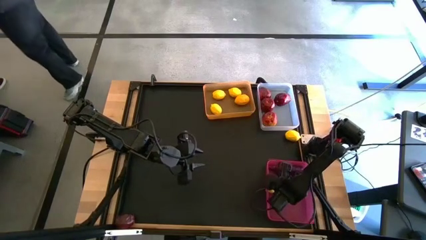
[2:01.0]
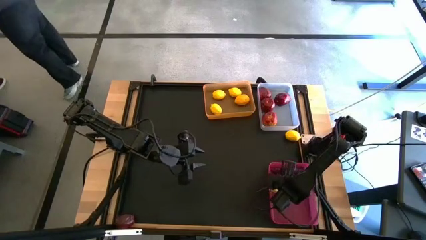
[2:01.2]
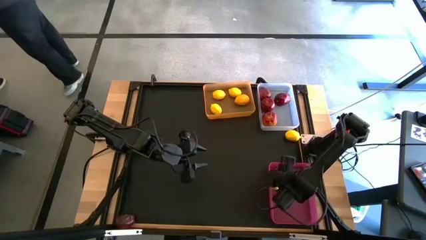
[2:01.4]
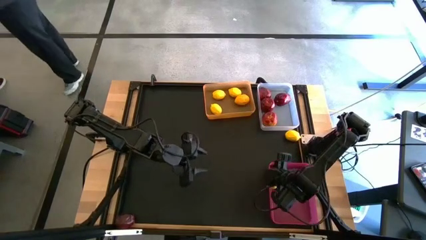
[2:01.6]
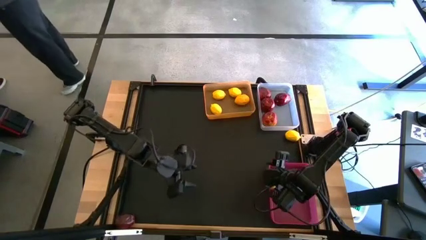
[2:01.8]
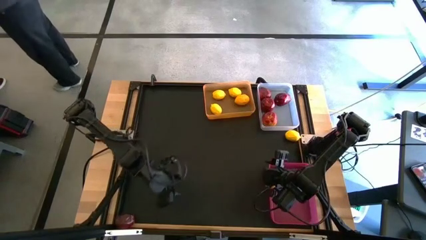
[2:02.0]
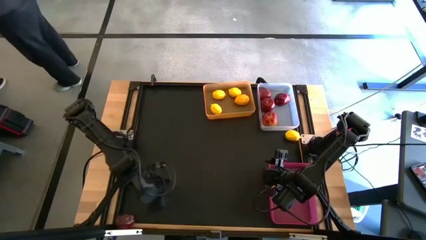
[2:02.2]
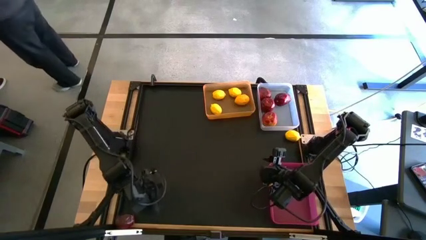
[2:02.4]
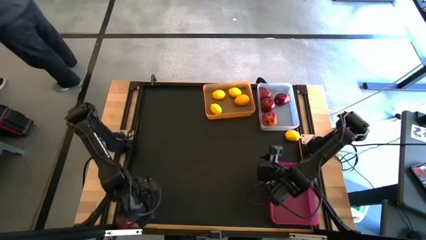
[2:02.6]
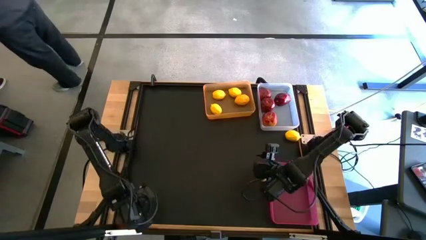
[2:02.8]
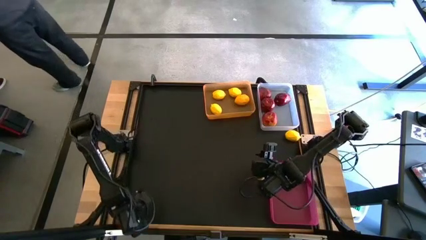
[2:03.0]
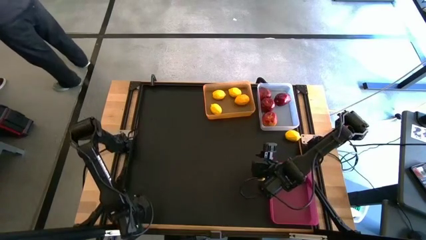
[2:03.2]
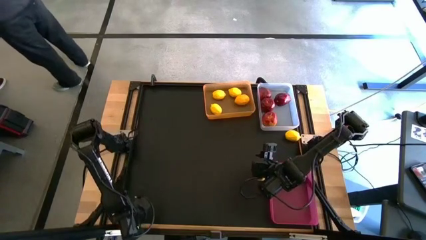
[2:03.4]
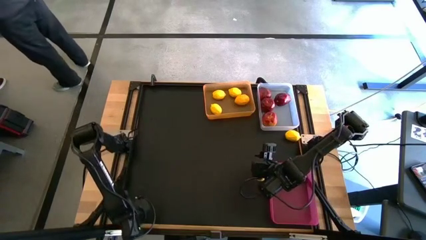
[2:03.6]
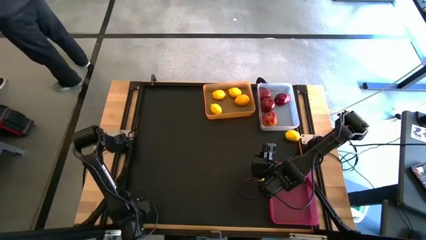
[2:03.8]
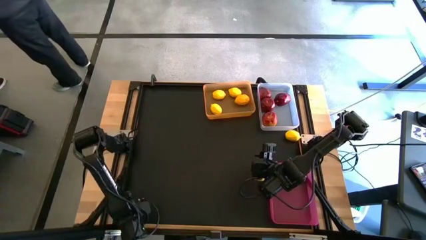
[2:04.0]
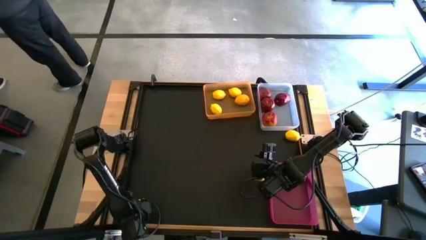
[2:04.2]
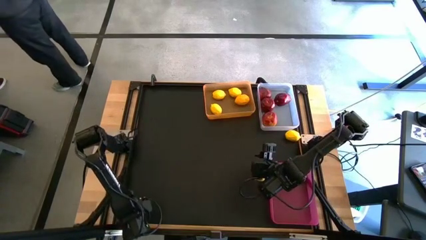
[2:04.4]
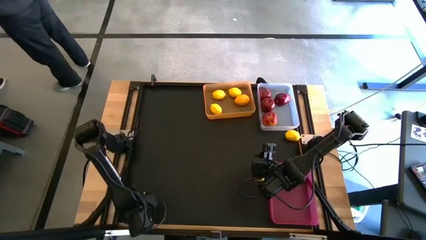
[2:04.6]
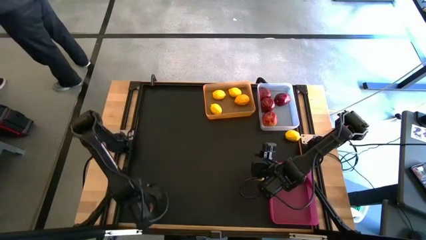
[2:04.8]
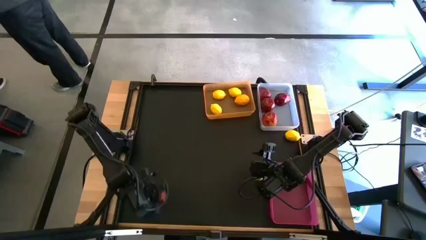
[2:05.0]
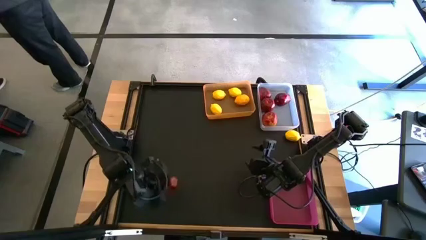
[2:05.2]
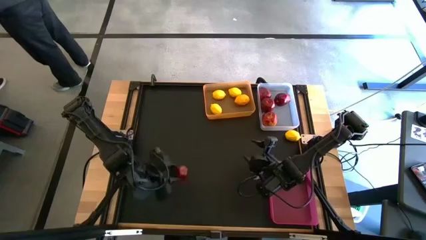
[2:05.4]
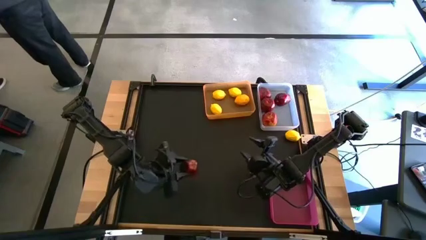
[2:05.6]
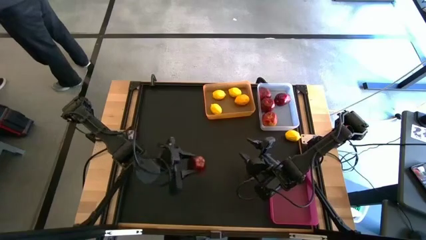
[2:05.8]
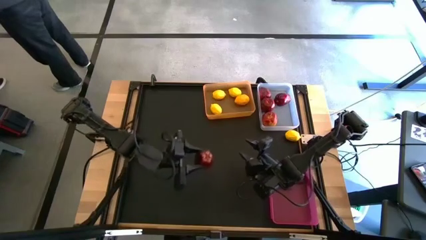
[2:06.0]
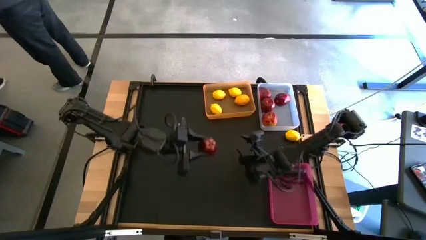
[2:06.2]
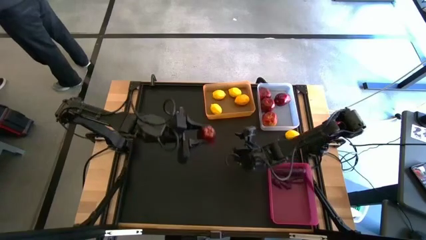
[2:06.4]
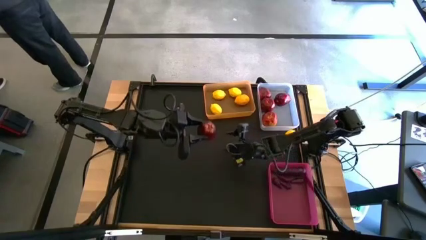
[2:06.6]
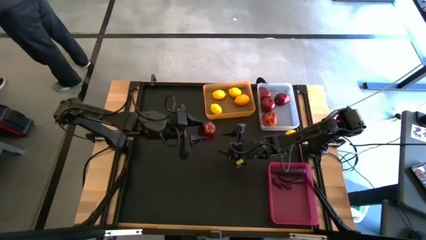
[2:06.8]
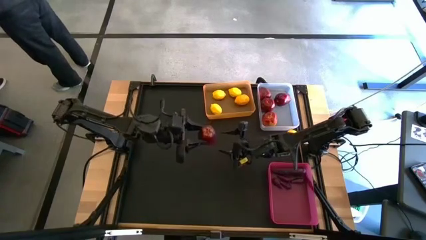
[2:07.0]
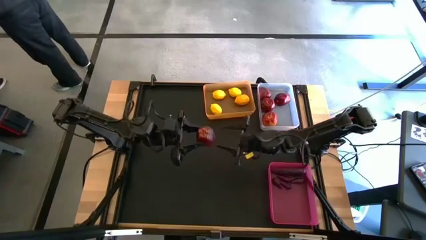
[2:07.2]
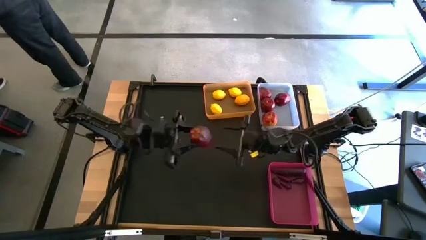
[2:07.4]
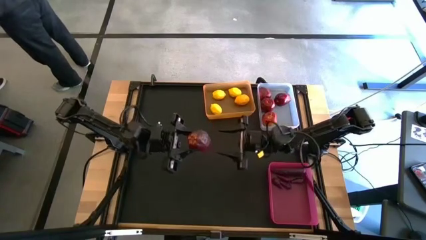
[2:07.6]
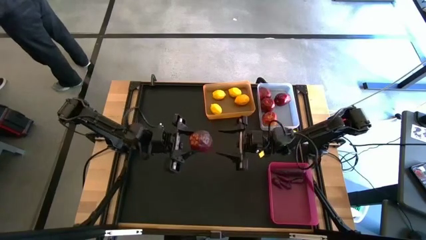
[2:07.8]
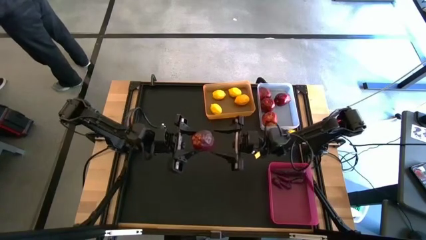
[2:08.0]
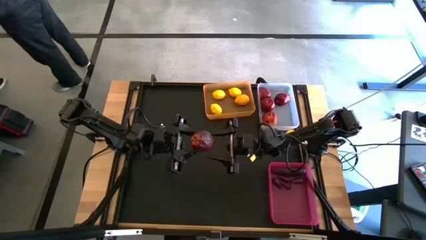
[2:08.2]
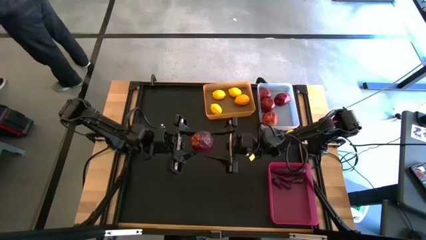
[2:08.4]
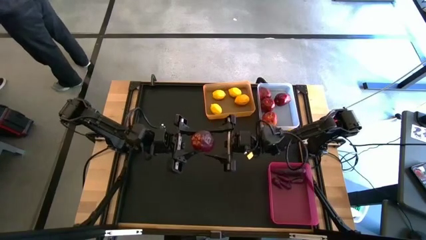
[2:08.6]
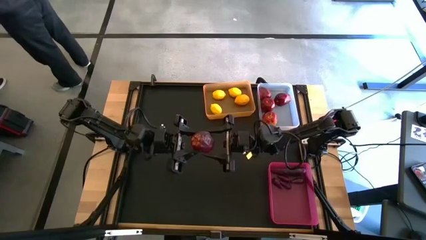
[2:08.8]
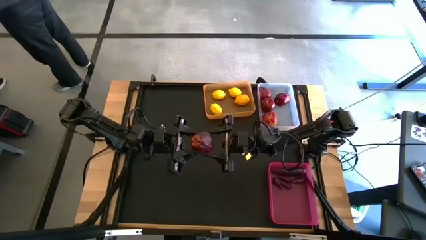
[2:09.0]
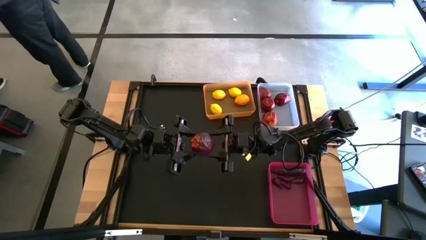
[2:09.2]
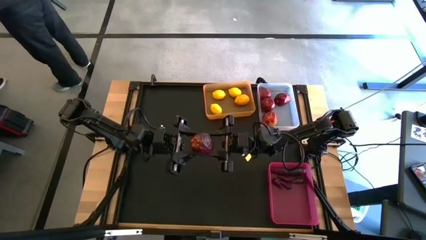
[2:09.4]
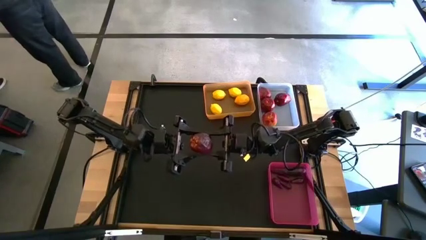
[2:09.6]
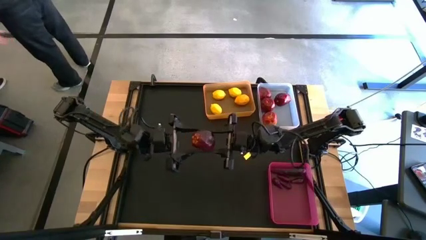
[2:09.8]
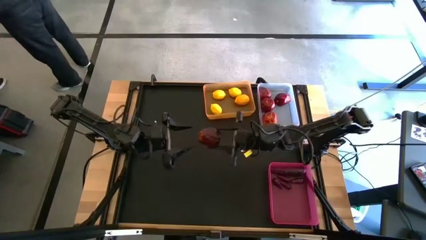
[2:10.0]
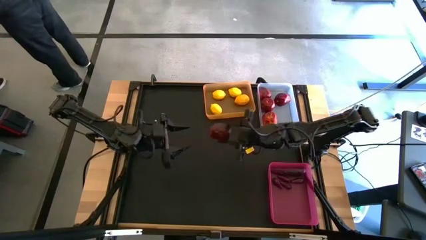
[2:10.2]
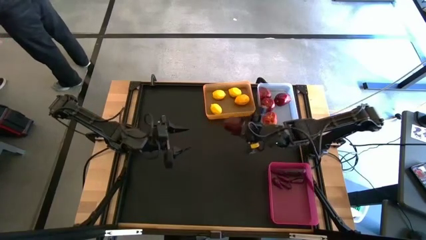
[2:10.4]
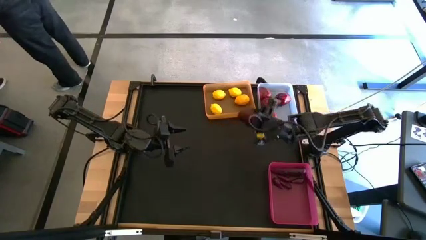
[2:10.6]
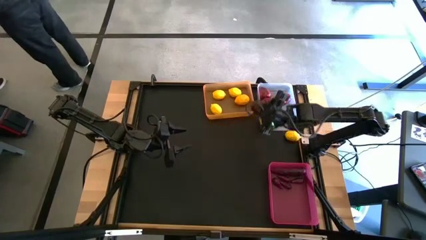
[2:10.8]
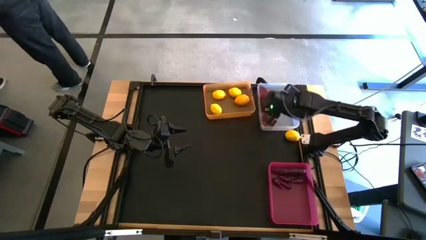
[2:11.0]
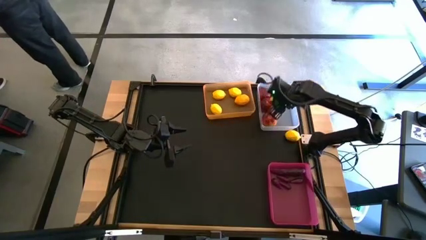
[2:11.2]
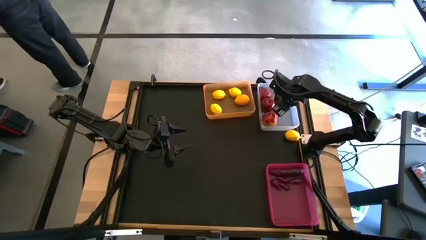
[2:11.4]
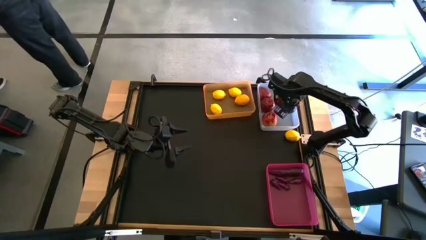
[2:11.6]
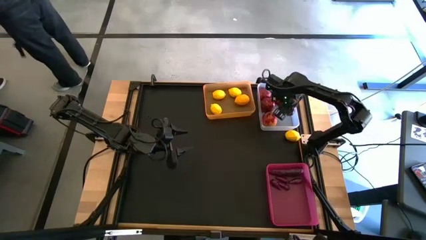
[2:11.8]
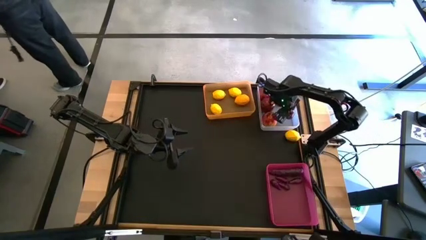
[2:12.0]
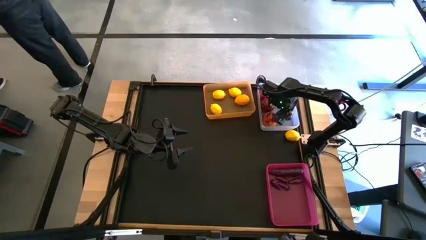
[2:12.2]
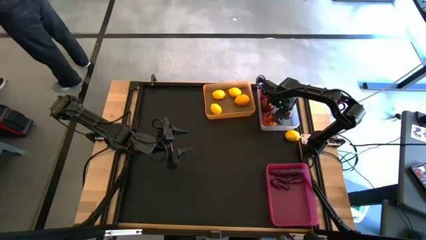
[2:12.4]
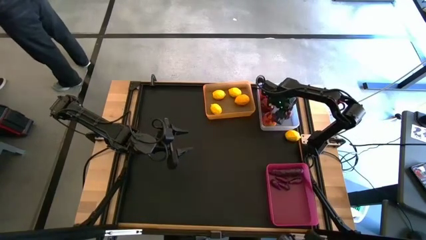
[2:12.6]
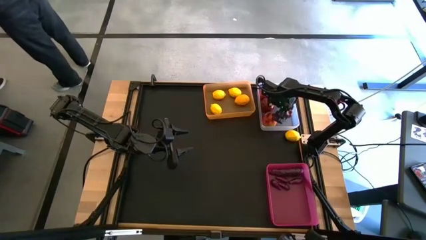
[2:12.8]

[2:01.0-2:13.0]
Task: Sort produce into baskets
Put the red apple into the white bin

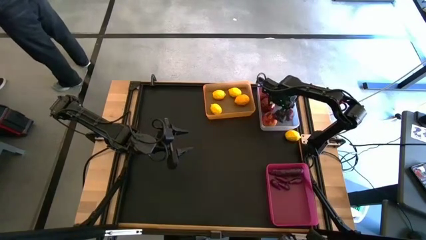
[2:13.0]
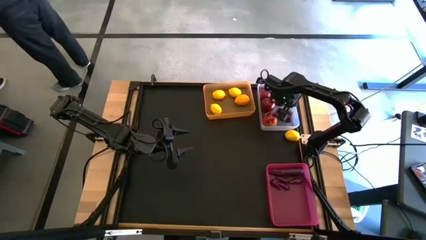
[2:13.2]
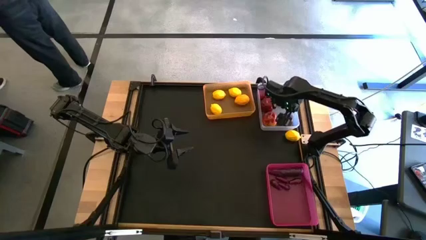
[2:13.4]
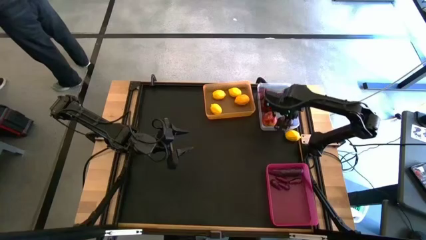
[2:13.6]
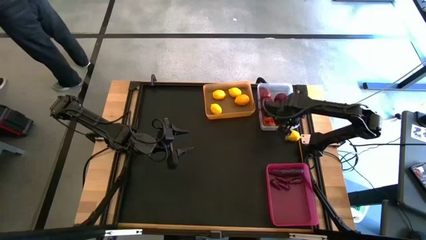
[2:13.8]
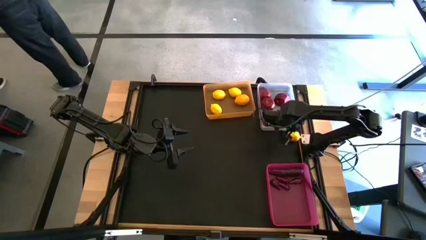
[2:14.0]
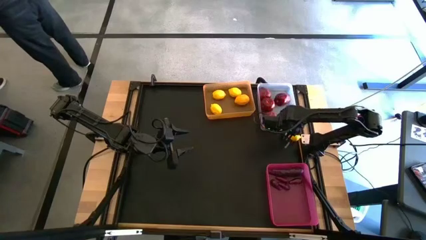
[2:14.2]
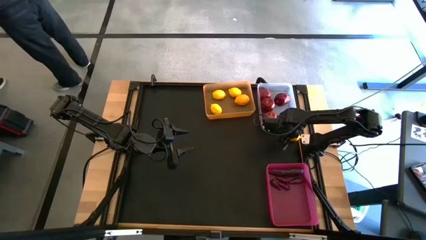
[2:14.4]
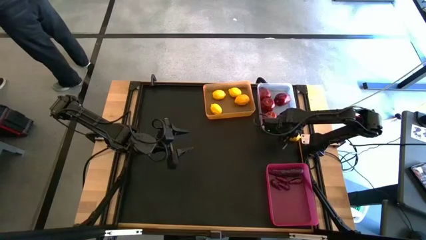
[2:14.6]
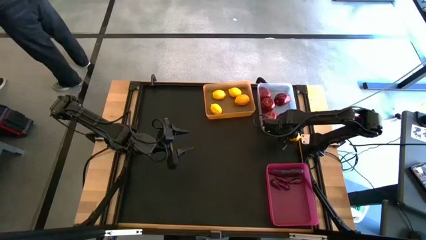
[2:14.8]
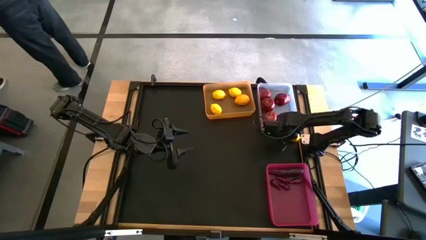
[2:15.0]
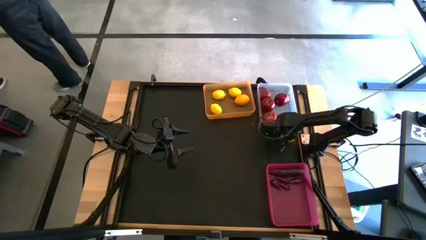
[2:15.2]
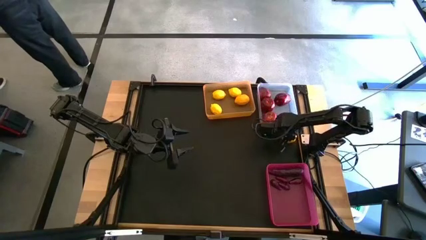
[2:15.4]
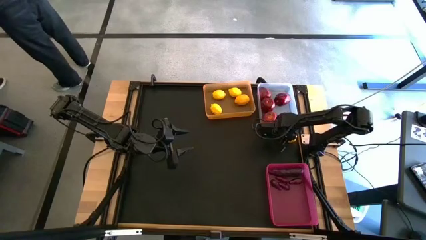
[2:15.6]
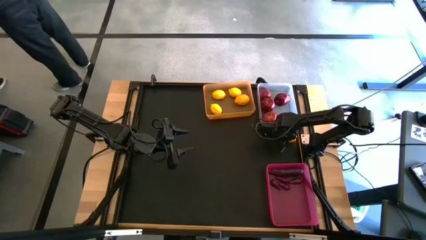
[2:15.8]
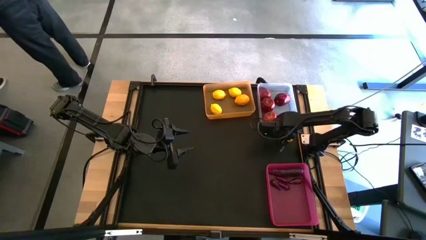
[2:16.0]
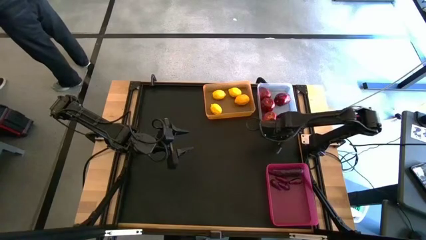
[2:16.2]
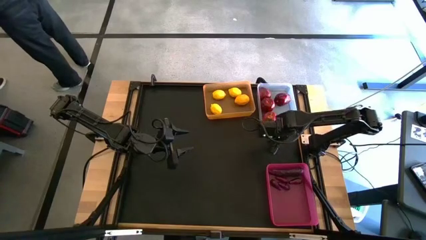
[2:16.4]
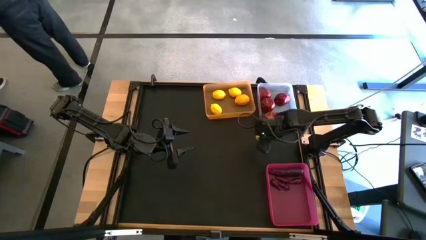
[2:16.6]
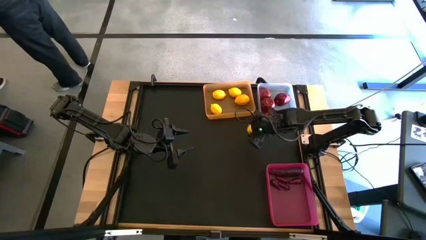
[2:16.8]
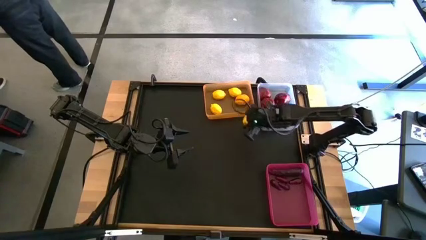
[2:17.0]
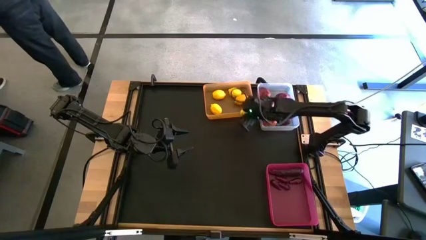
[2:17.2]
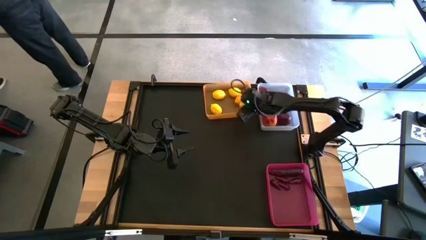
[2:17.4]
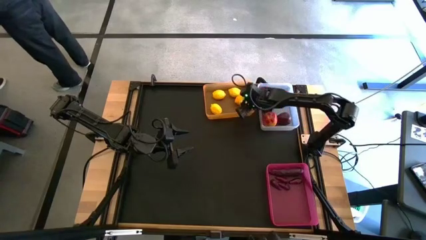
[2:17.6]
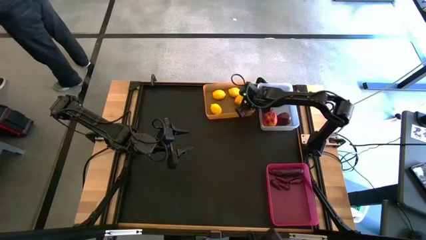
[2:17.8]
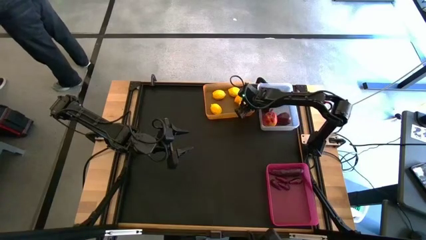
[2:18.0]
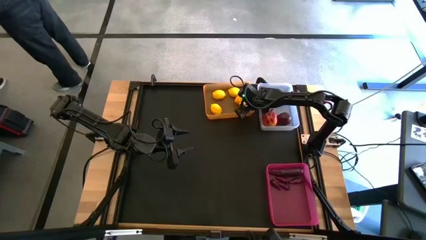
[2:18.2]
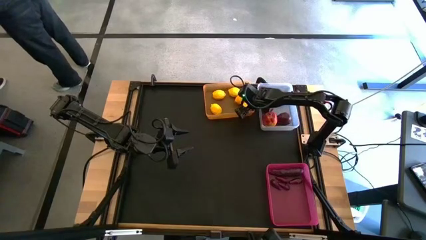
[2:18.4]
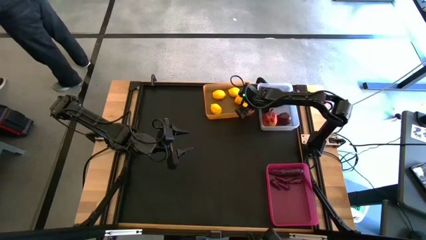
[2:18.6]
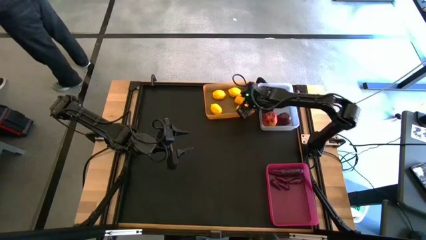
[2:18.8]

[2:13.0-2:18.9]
Put the yellow lemon into the orange bin
